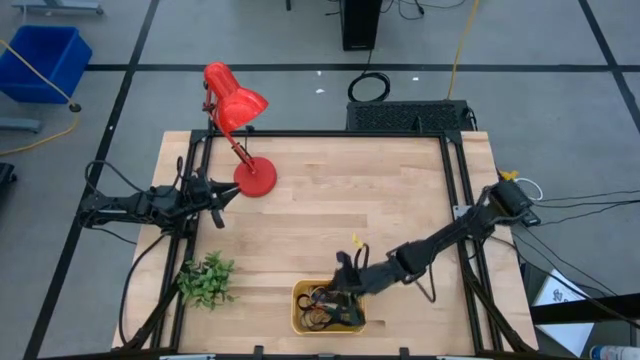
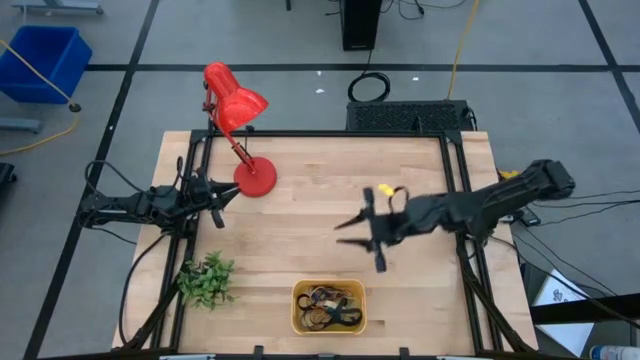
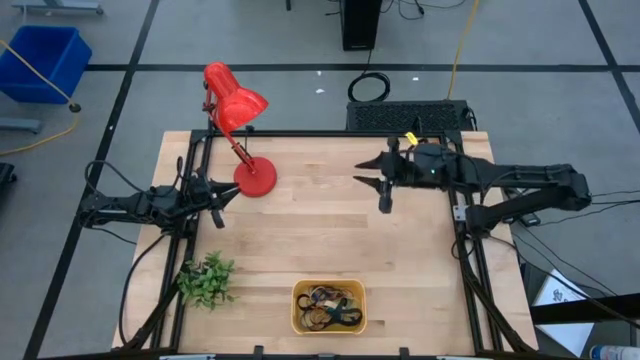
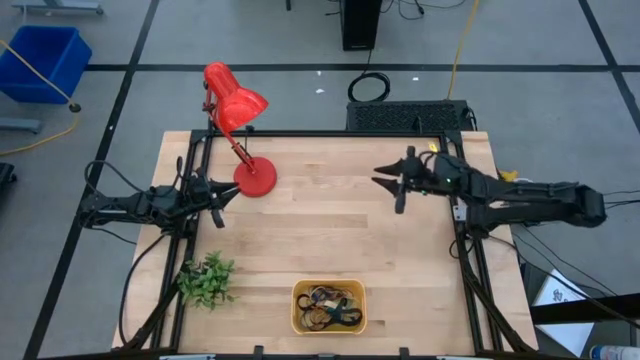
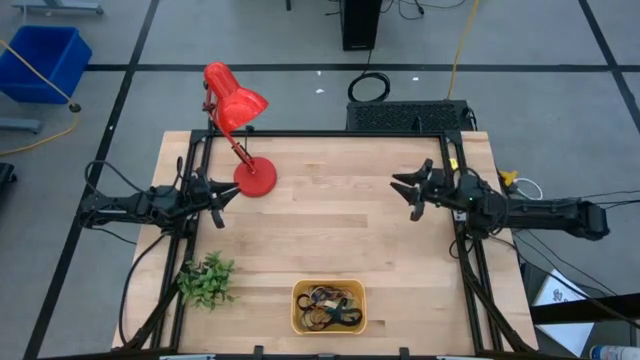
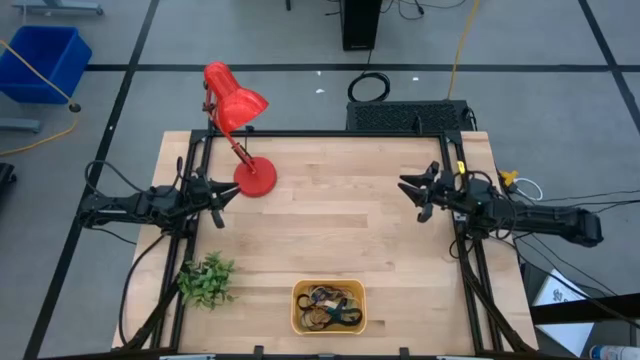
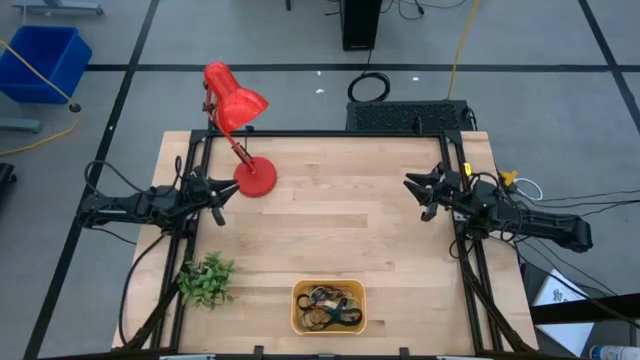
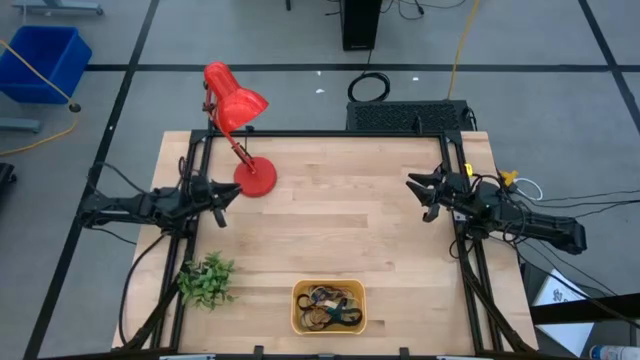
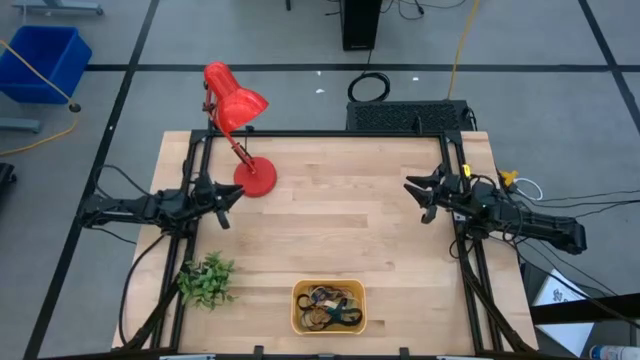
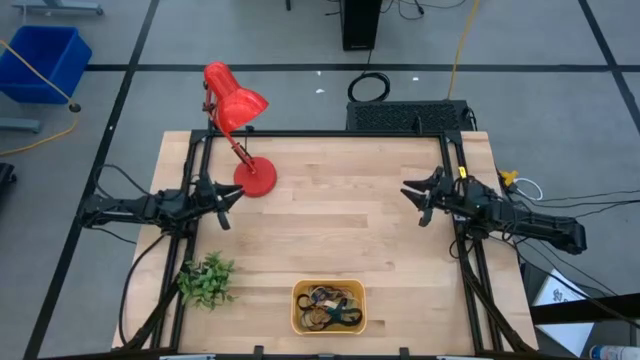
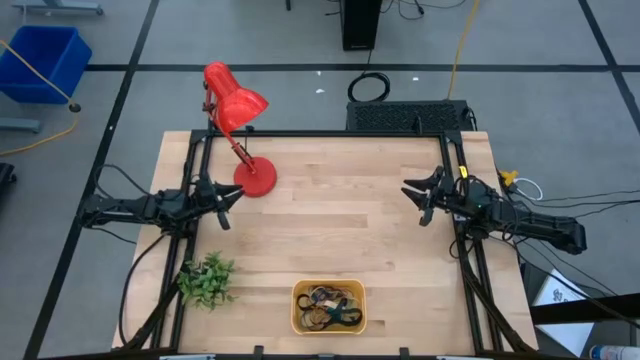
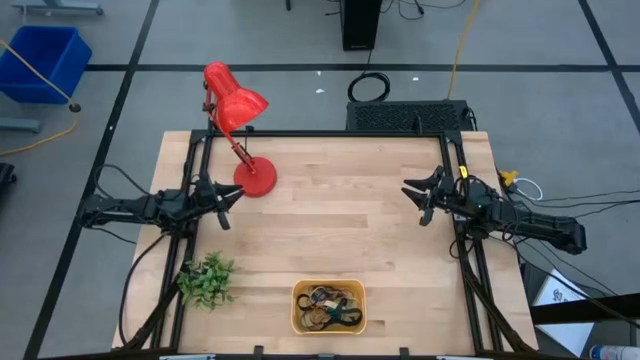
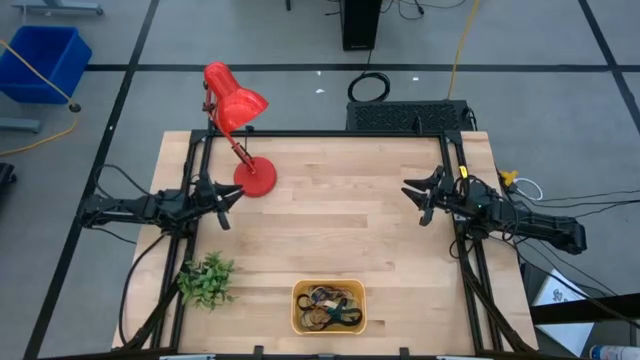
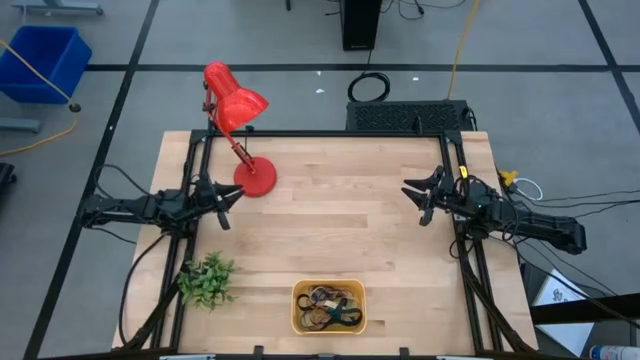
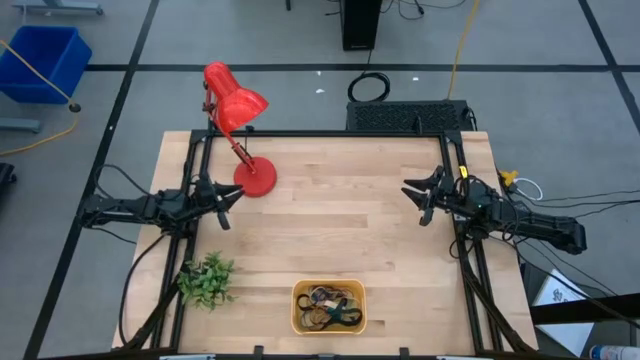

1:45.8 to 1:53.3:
Task: Pick and place rubber bands into bin
Return to Home Position

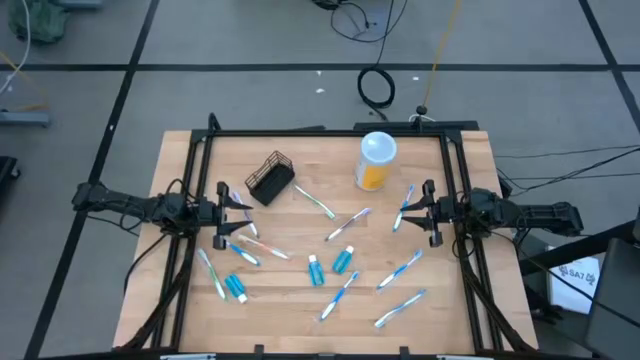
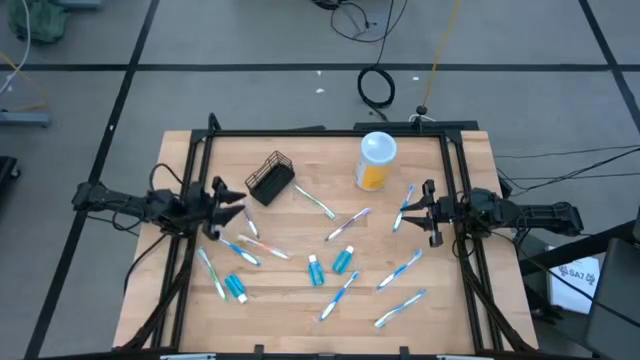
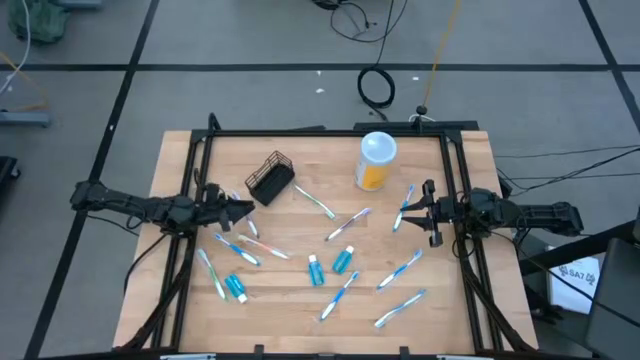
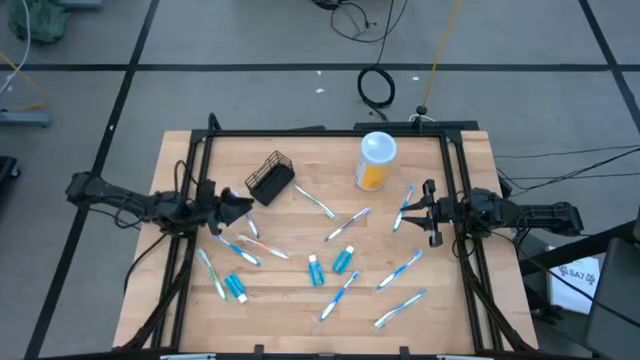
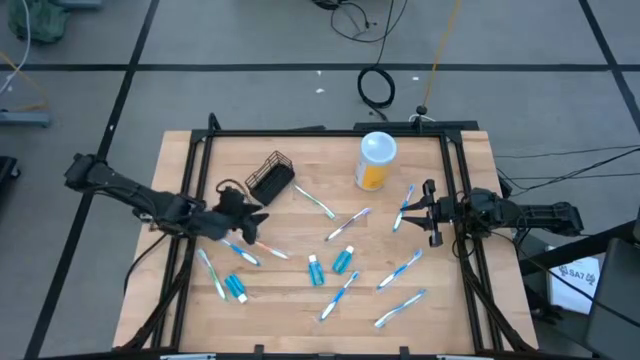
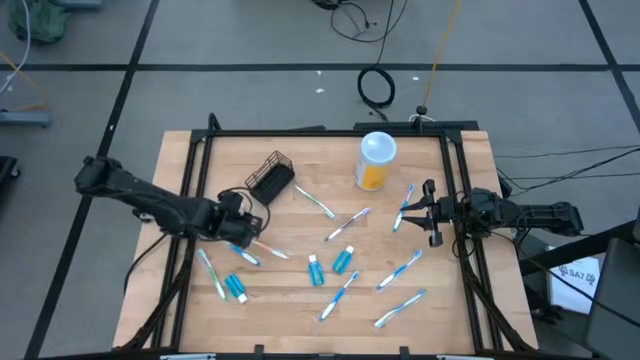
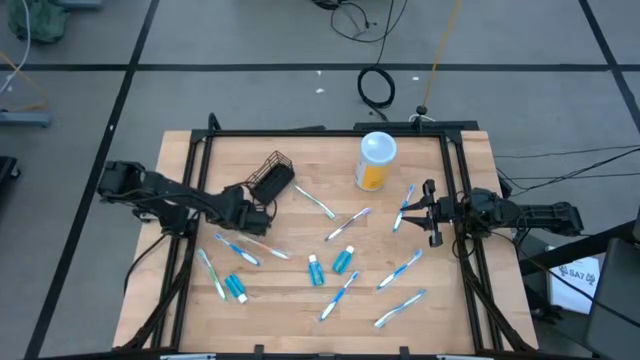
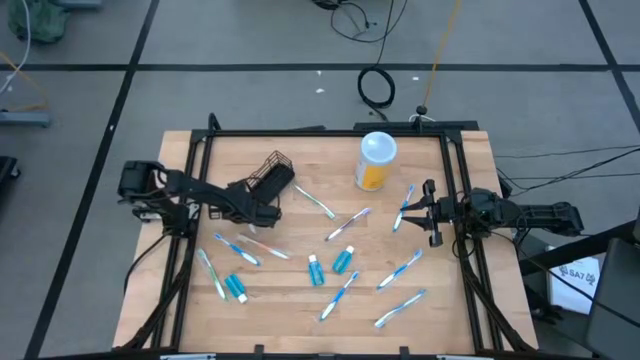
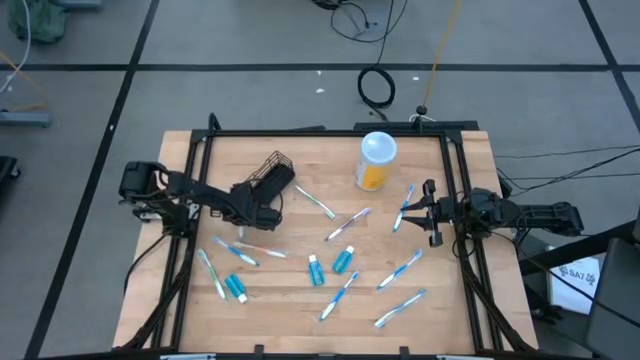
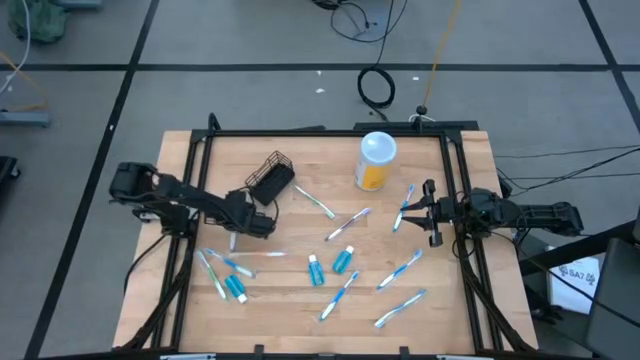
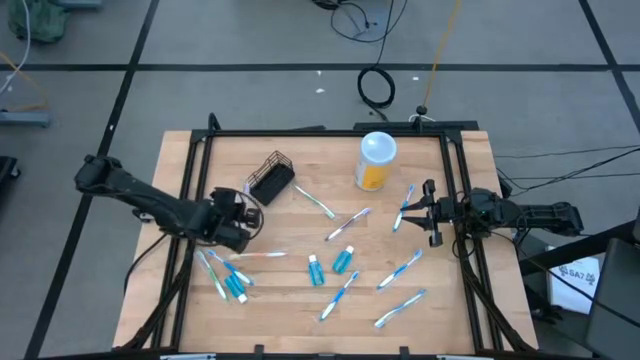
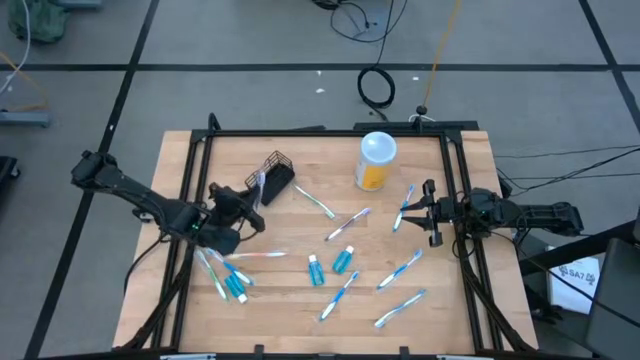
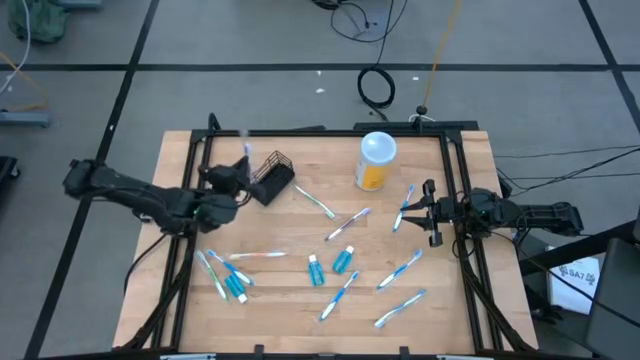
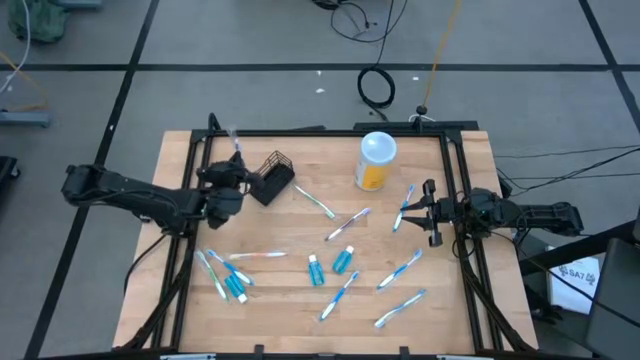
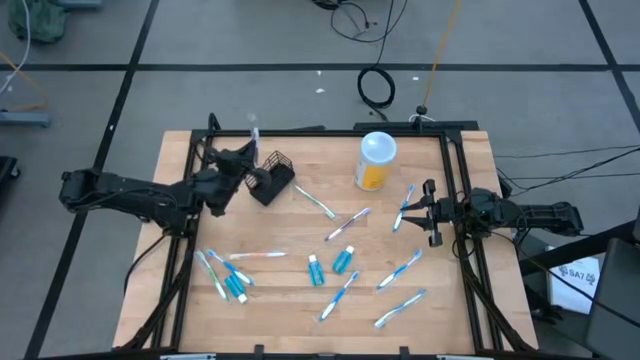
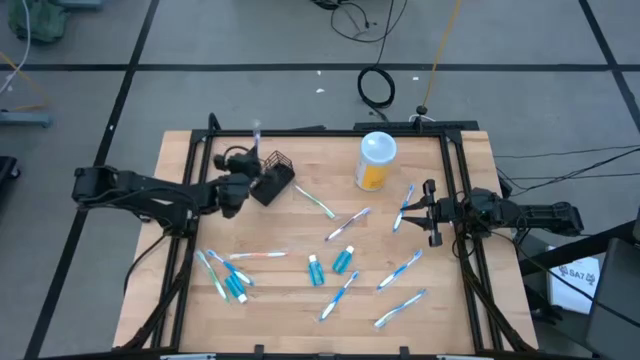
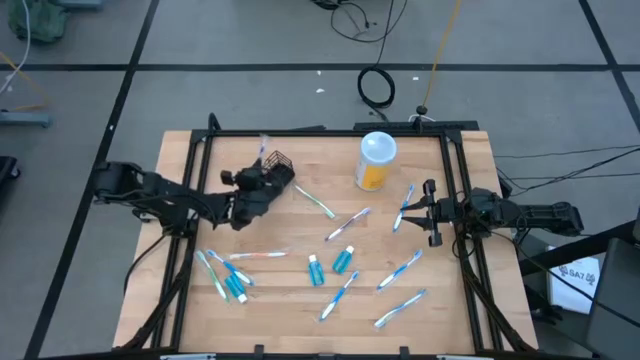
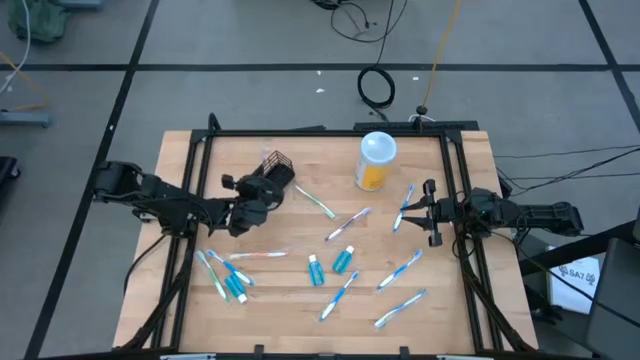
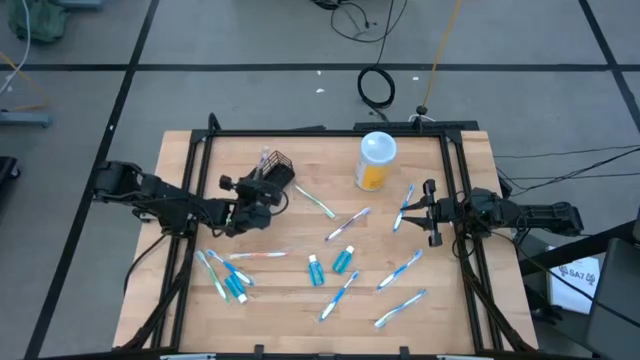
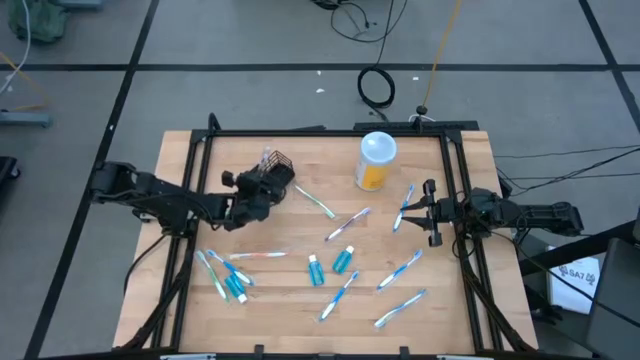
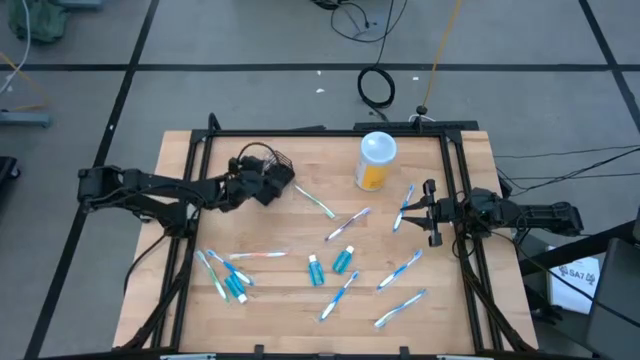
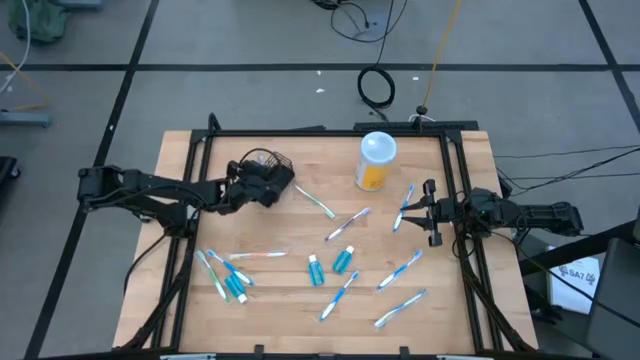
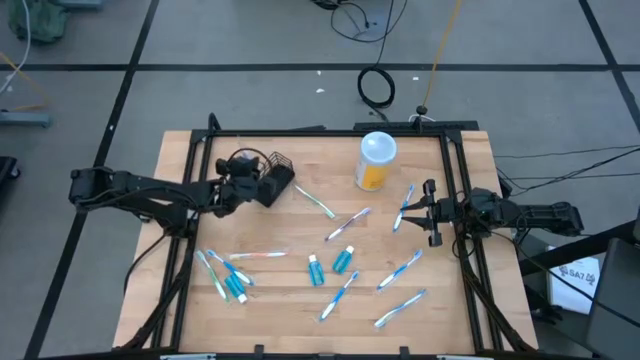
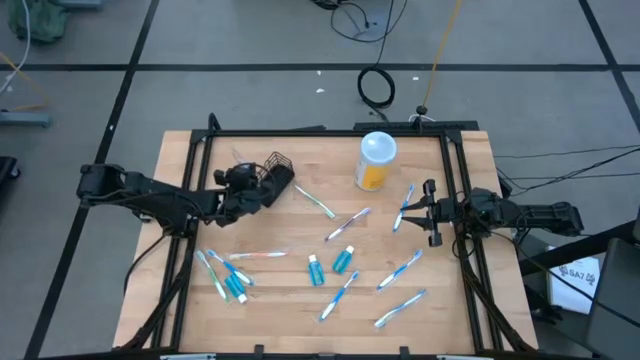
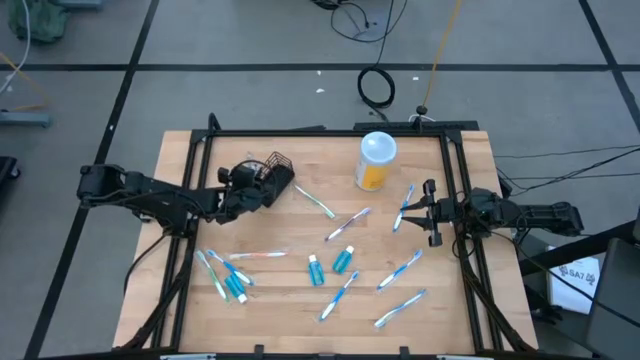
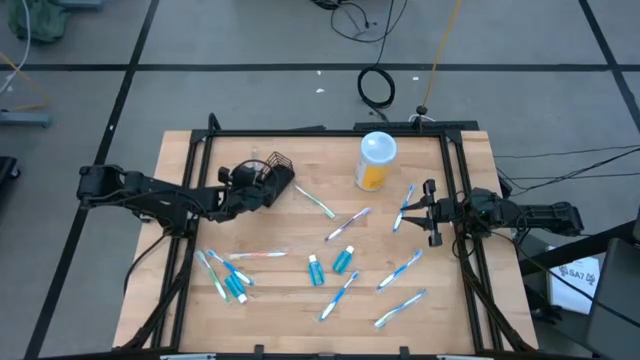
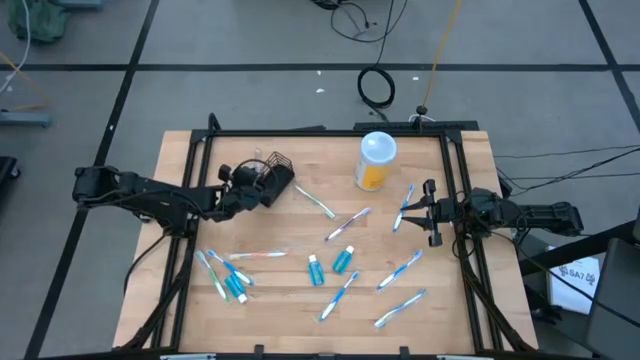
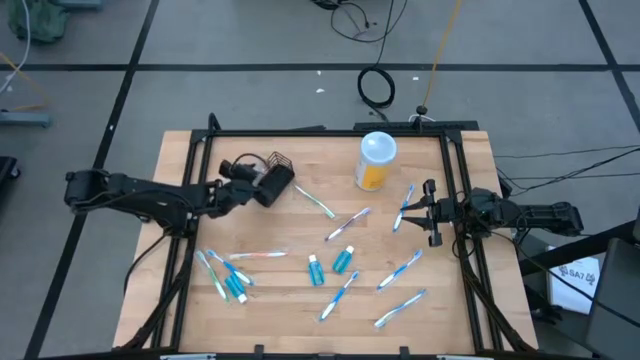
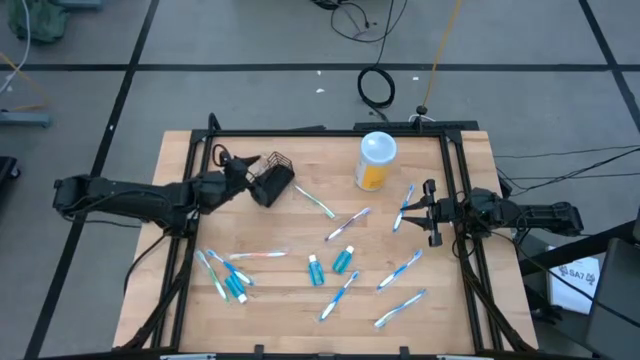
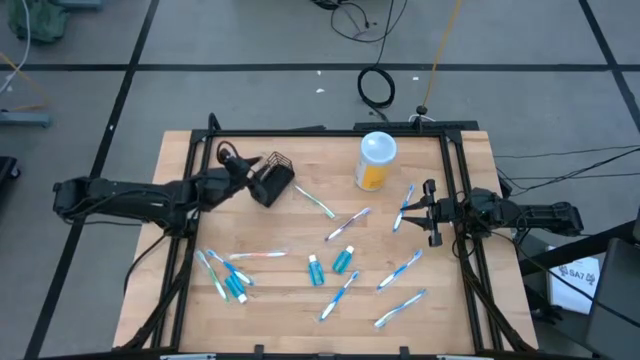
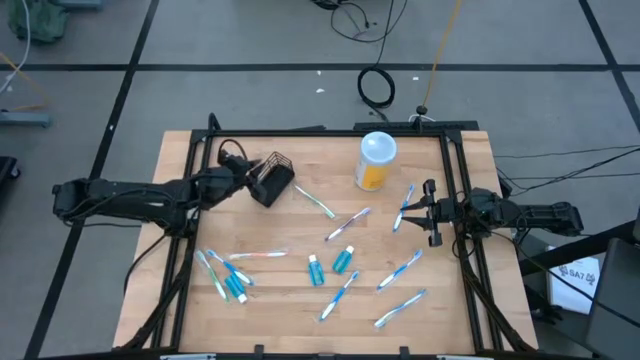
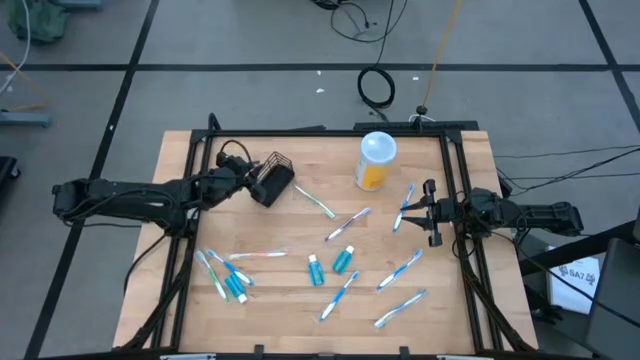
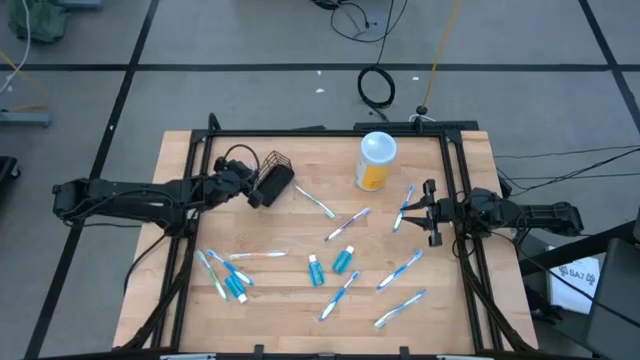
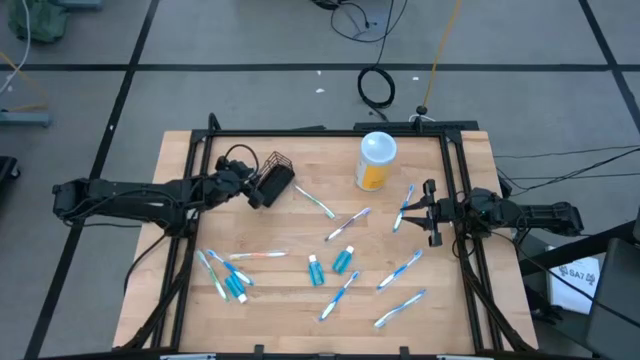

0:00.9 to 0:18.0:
Task: Pick & Place toothbrushing station
Put the left violet toothbrush into the black wire organizer
